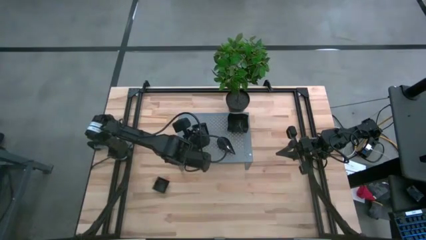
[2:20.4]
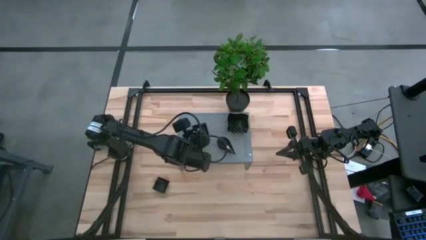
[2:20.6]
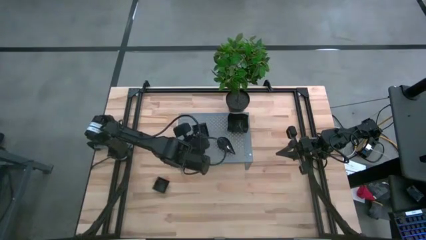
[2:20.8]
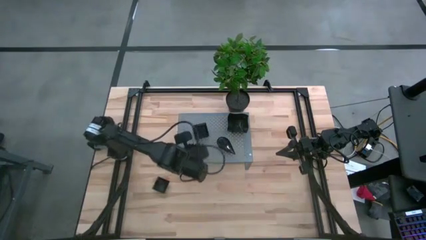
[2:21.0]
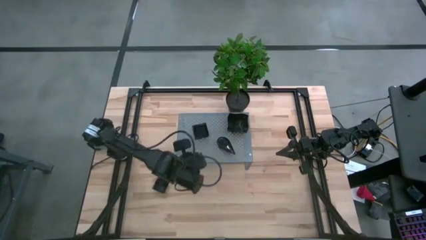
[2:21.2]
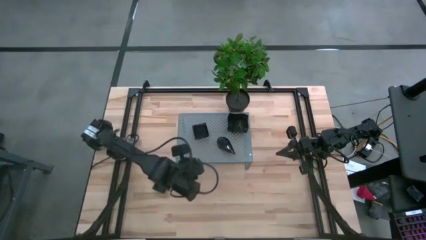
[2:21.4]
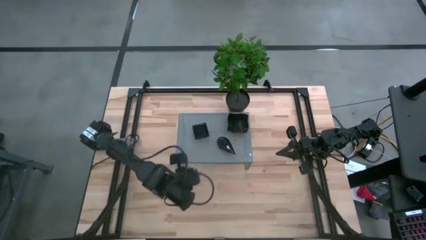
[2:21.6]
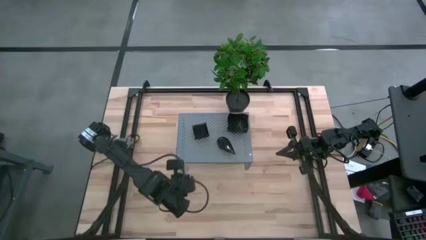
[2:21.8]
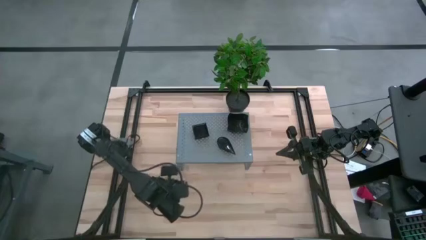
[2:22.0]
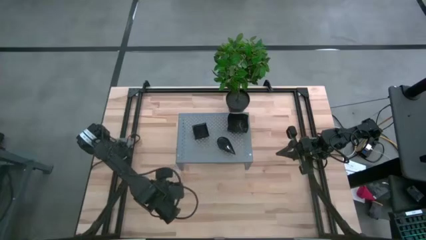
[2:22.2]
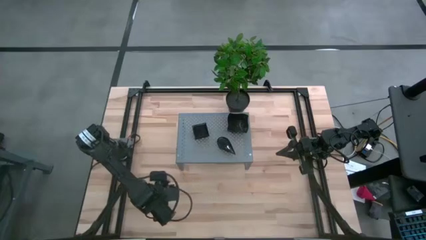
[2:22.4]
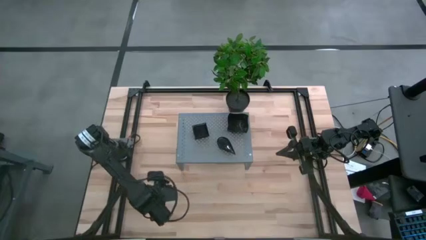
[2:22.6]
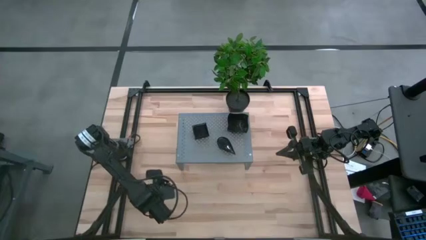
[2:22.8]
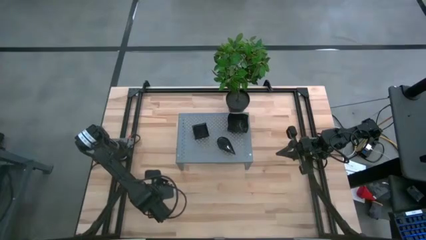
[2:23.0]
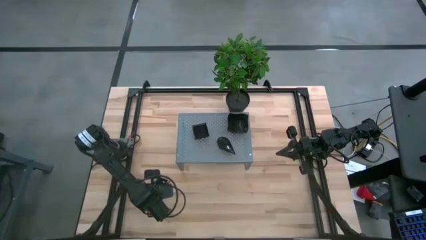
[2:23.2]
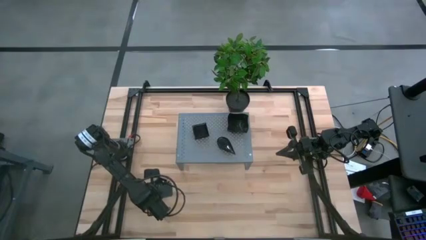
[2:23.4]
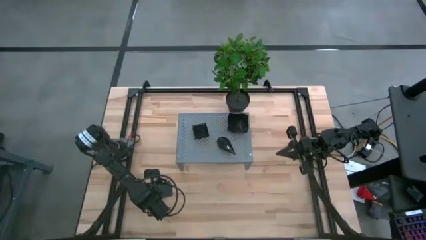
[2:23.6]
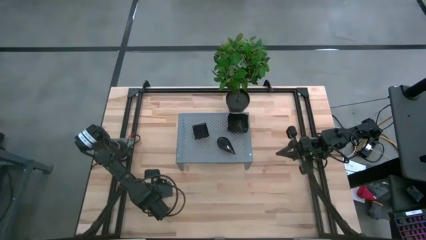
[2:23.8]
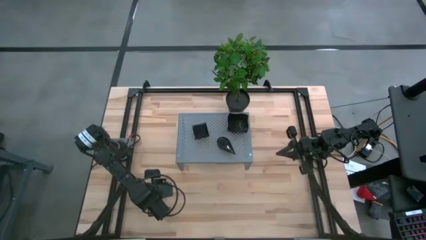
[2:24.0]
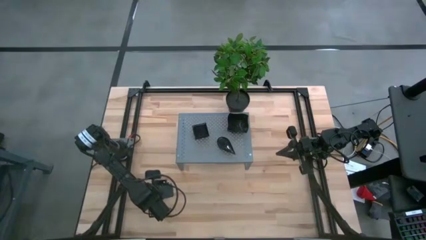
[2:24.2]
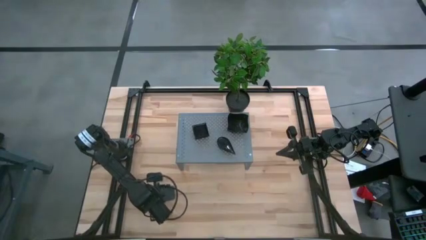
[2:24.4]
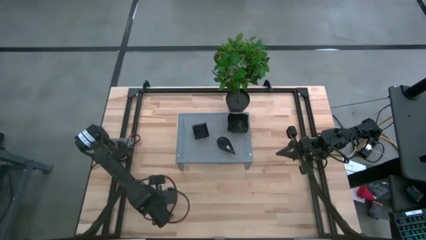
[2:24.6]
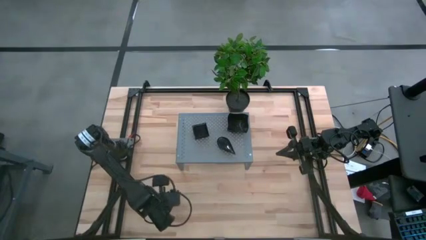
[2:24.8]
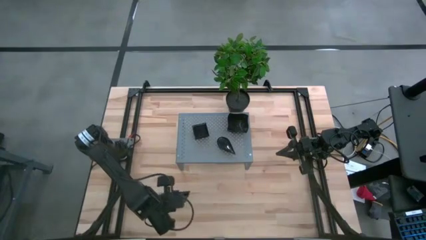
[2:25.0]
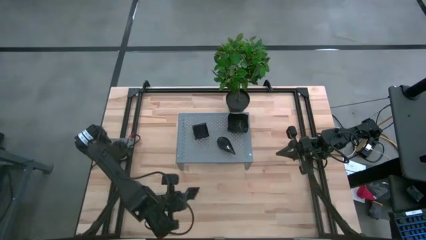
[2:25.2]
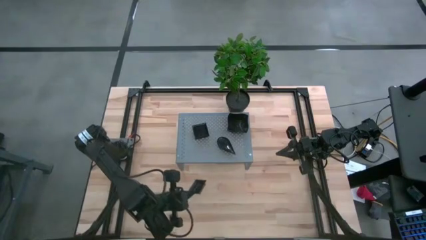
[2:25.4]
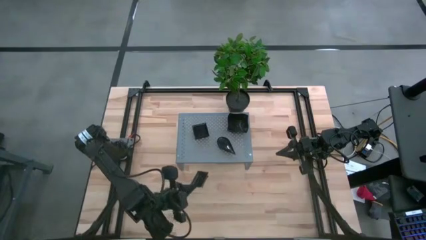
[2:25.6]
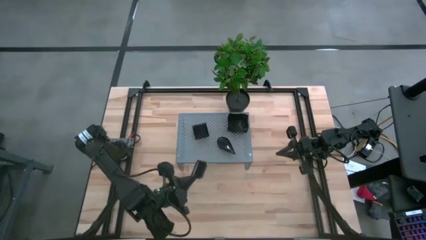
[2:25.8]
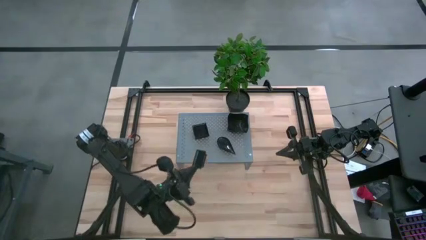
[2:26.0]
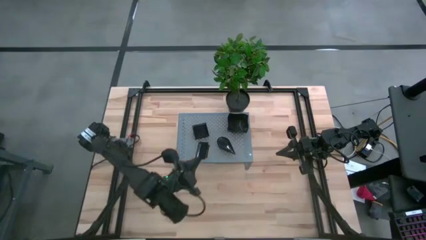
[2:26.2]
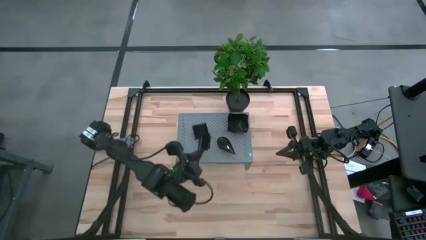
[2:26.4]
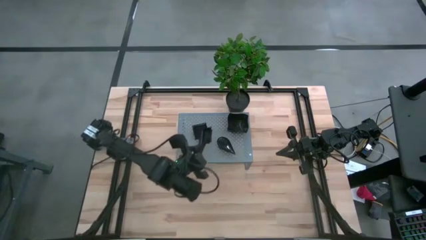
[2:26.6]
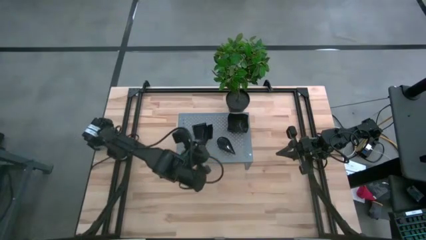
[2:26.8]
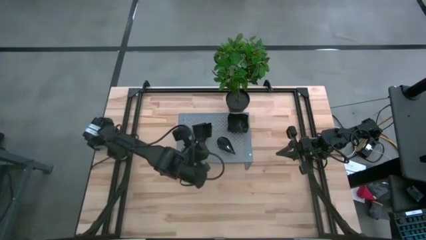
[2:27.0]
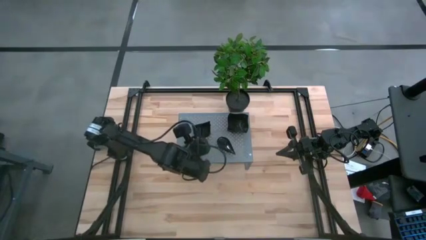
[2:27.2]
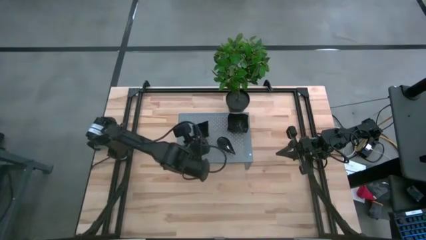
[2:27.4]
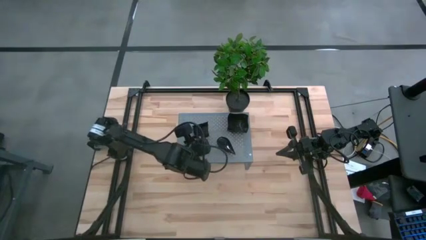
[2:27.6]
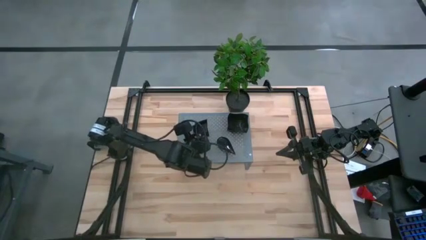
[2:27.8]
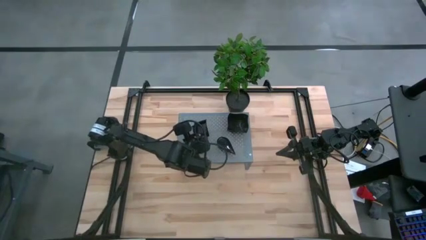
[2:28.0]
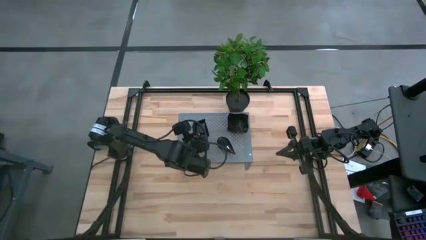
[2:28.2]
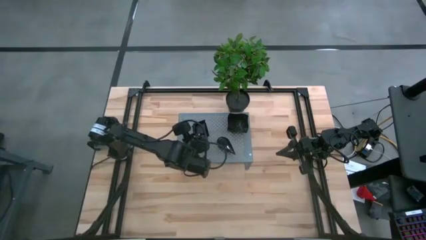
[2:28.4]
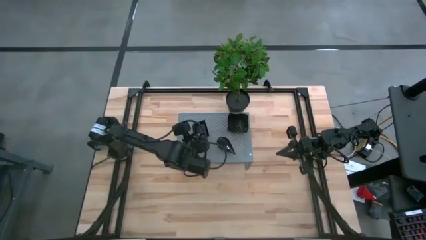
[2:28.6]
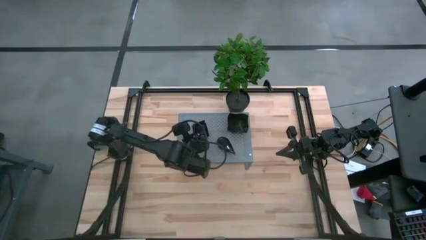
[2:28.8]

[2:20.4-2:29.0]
Task: Pick & Place Mini shaped plates
Stack the black square plate on the black square plates on the shelf

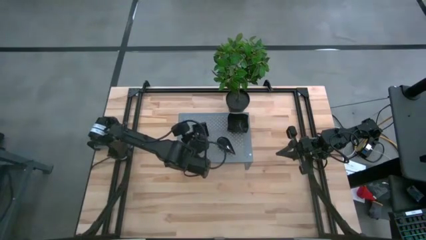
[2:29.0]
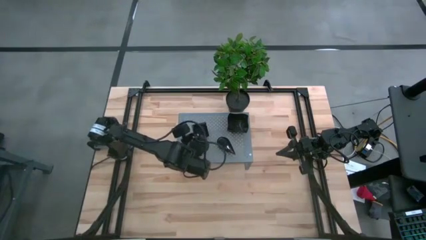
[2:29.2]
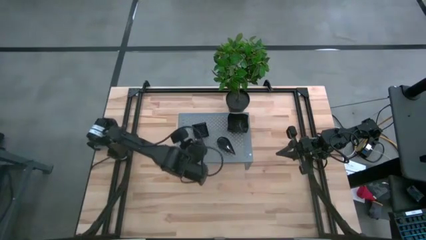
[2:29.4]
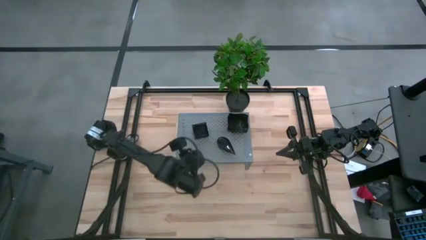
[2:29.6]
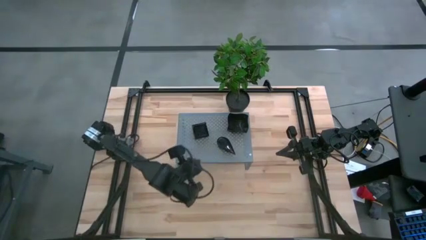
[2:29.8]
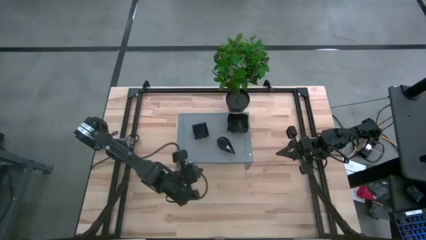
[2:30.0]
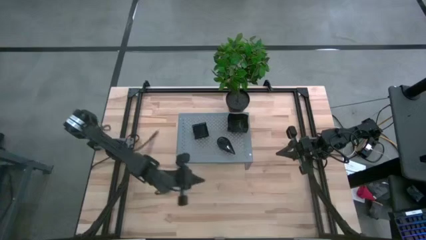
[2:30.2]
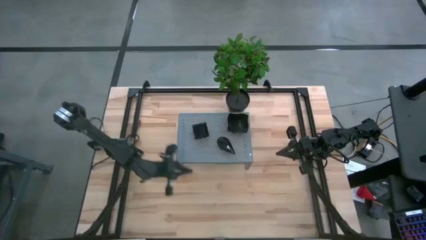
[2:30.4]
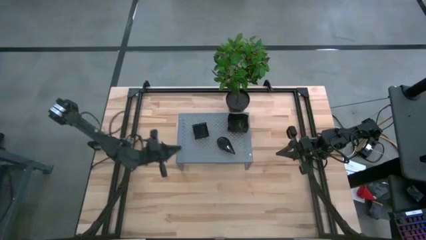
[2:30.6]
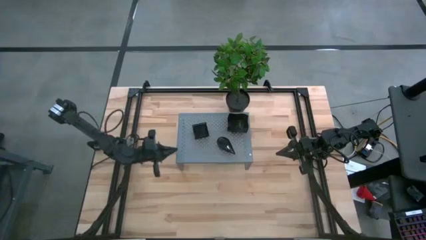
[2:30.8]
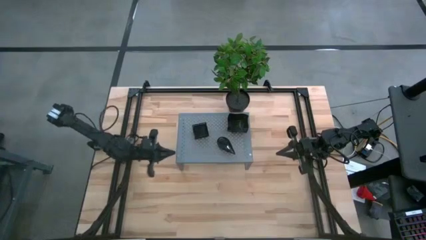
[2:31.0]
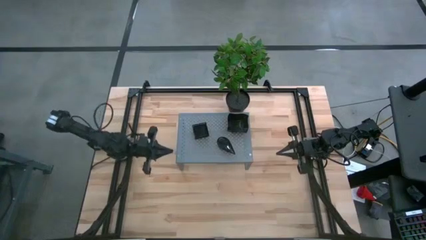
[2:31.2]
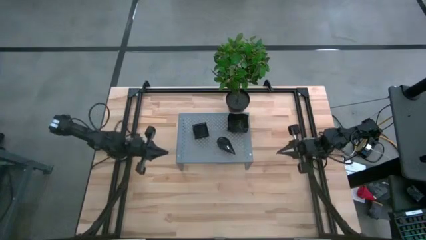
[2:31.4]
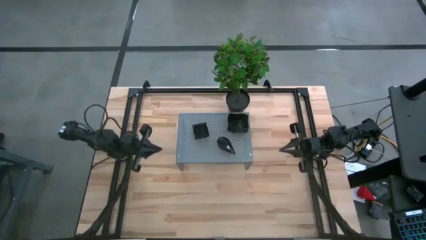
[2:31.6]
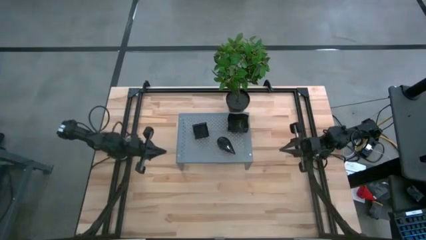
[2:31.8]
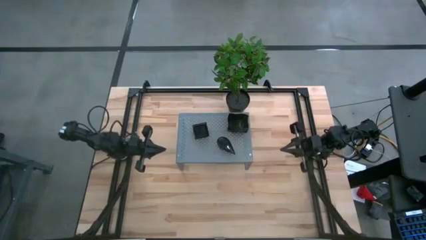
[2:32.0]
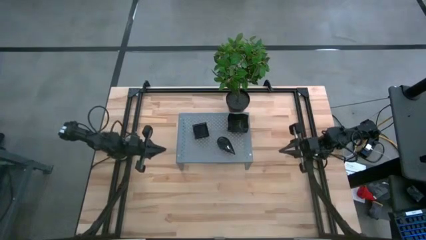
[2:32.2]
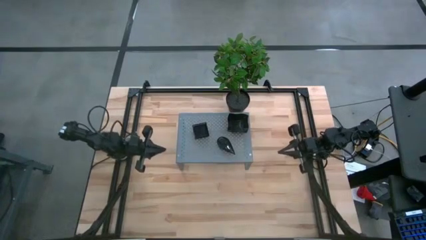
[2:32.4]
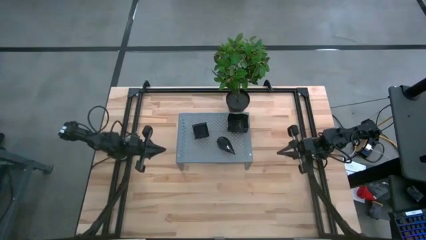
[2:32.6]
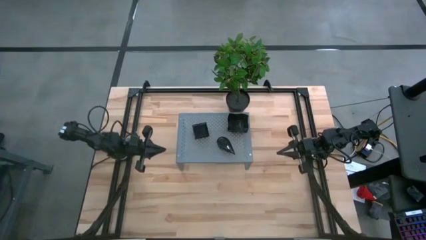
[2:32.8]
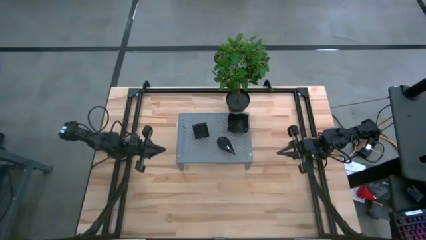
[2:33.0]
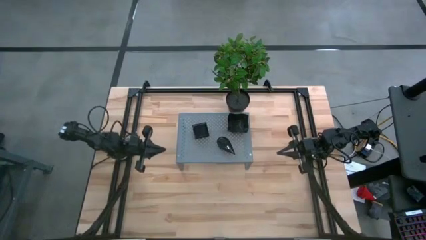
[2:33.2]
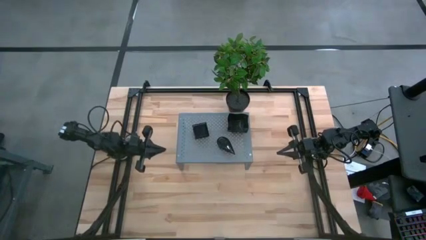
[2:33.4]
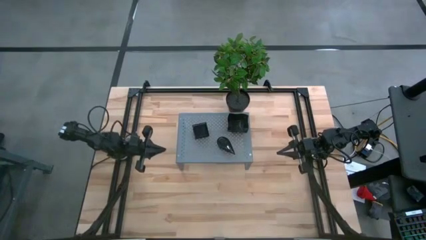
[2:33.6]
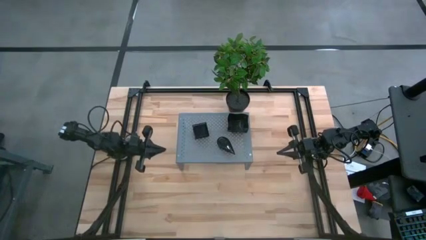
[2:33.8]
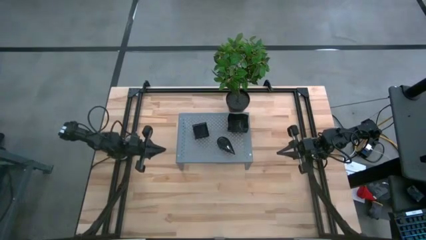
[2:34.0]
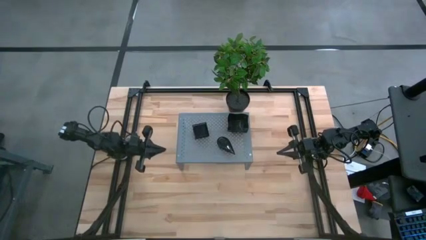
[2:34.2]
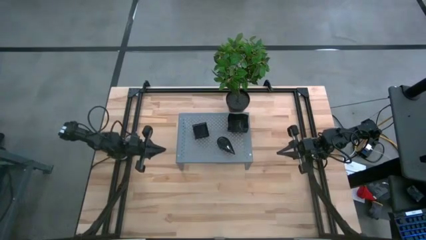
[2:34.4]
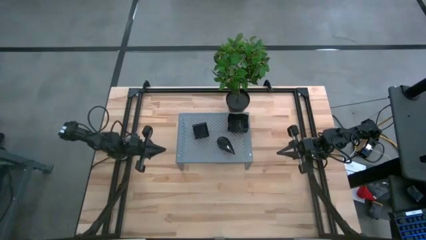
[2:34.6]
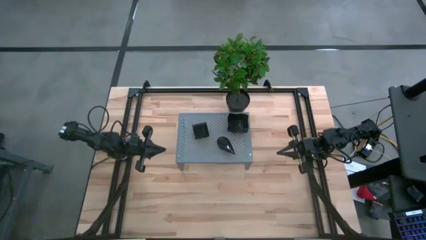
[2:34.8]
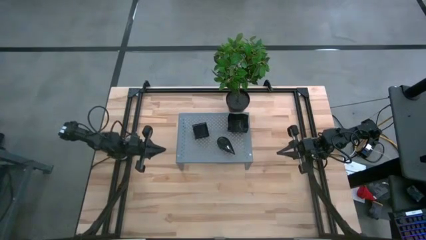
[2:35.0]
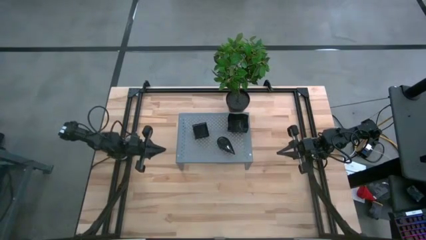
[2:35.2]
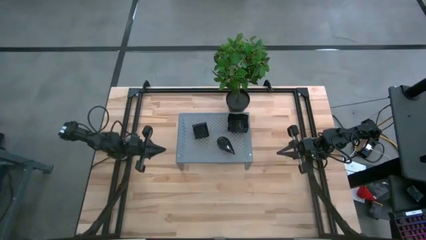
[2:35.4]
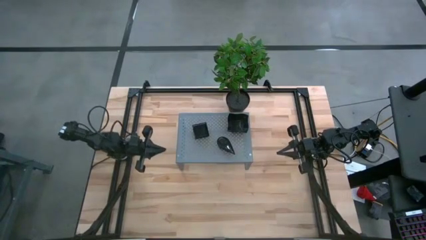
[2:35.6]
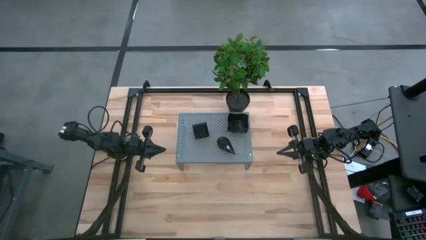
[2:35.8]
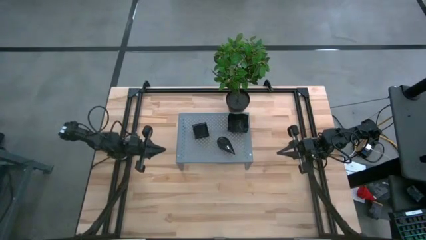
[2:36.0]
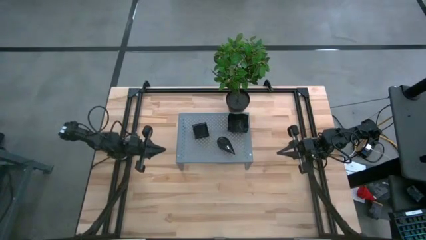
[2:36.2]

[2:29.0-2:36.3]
Return to Home Position
